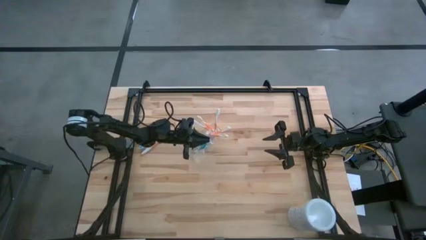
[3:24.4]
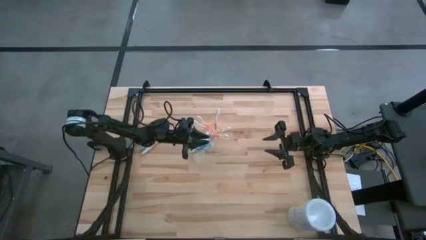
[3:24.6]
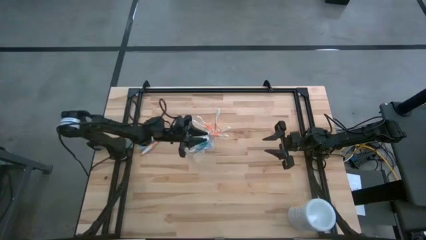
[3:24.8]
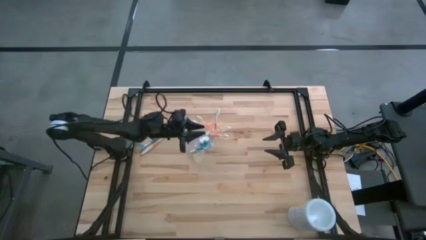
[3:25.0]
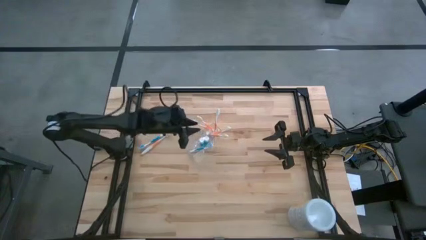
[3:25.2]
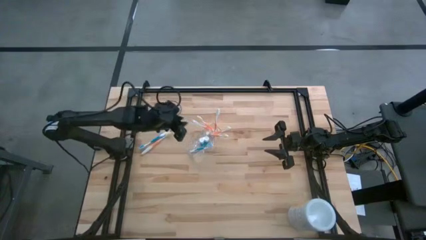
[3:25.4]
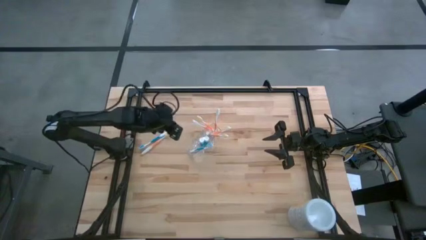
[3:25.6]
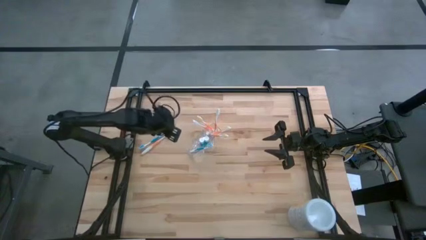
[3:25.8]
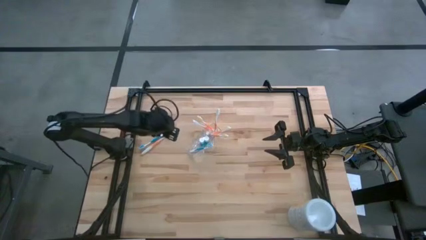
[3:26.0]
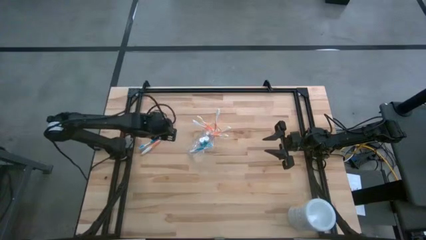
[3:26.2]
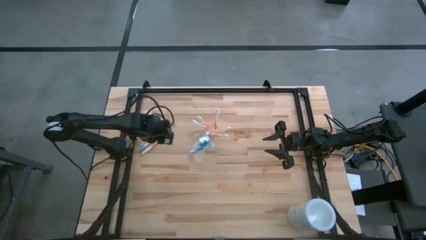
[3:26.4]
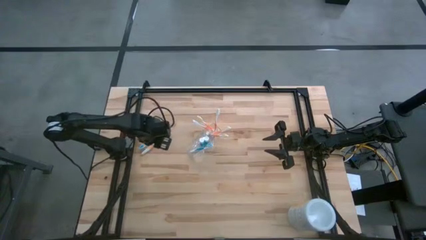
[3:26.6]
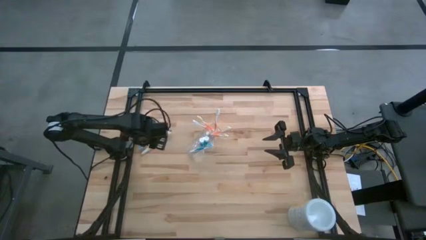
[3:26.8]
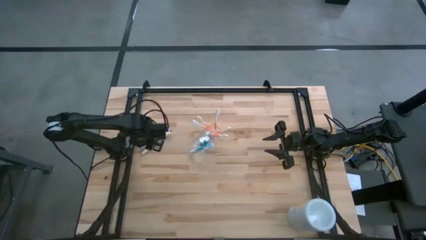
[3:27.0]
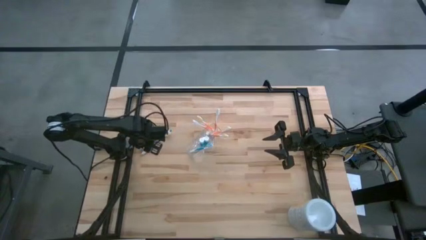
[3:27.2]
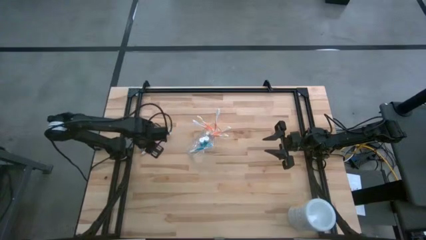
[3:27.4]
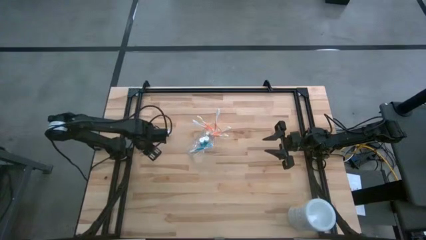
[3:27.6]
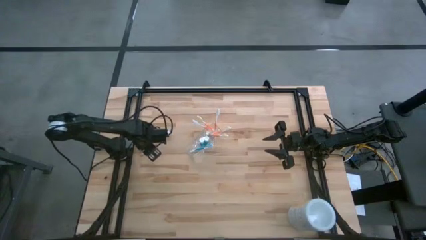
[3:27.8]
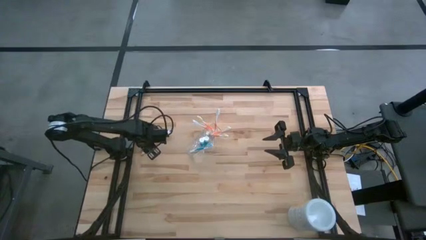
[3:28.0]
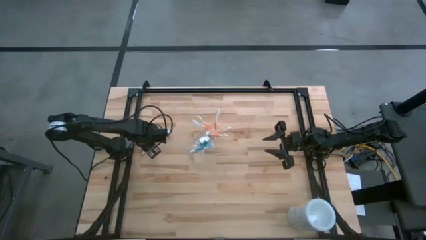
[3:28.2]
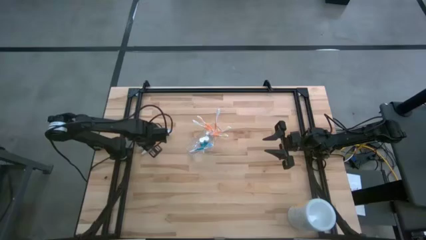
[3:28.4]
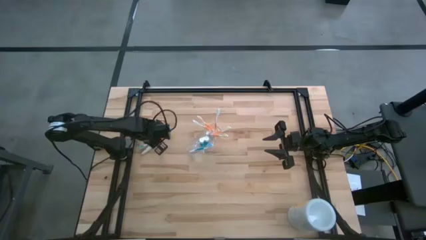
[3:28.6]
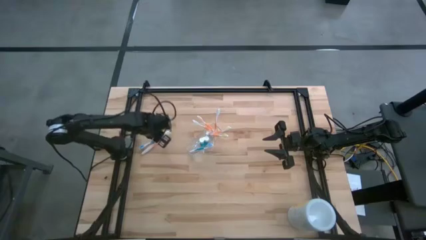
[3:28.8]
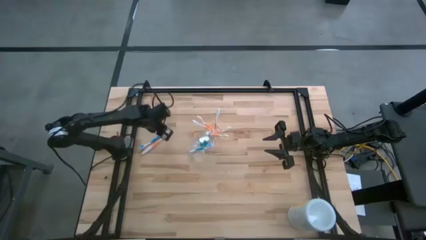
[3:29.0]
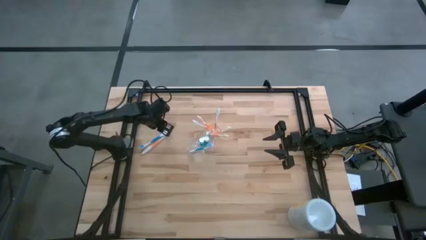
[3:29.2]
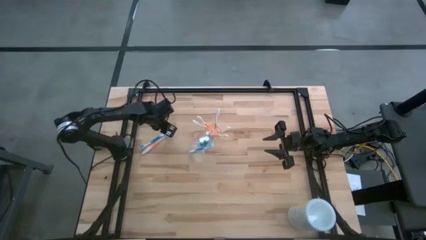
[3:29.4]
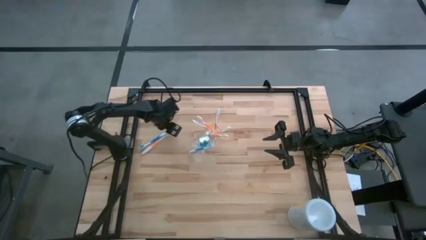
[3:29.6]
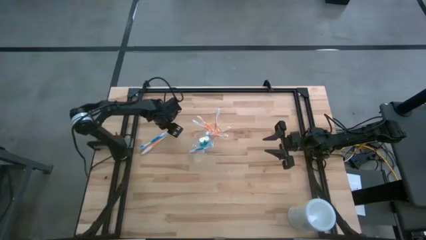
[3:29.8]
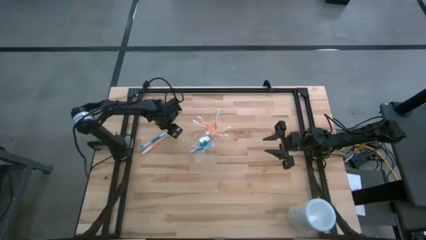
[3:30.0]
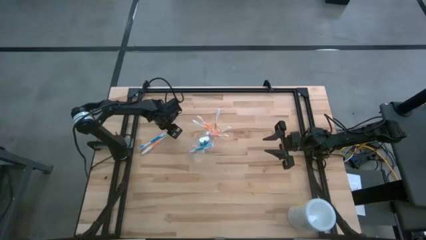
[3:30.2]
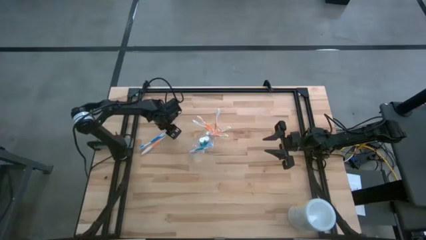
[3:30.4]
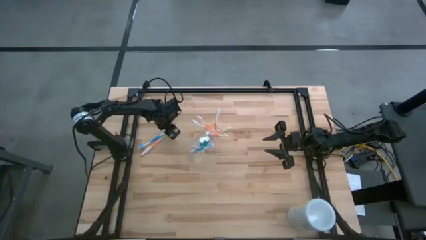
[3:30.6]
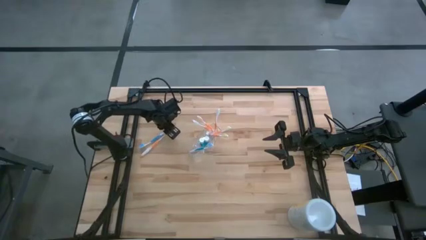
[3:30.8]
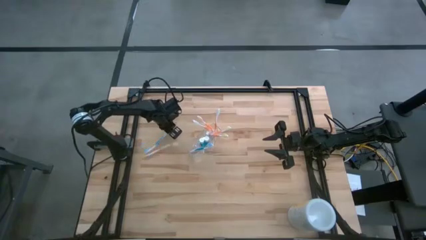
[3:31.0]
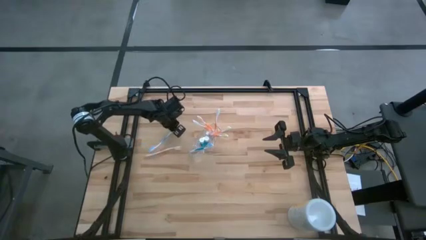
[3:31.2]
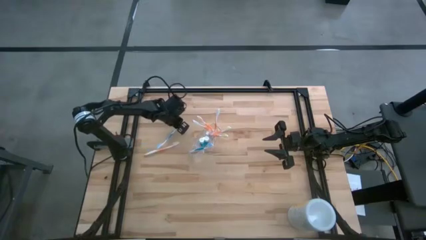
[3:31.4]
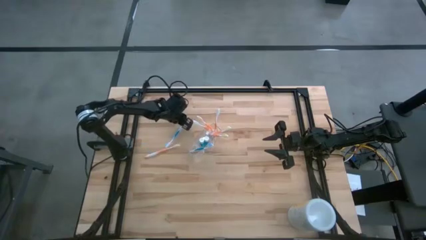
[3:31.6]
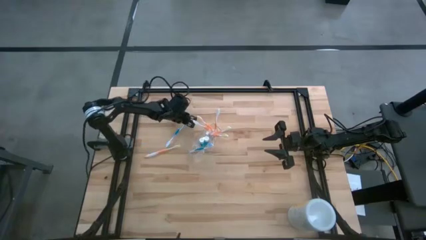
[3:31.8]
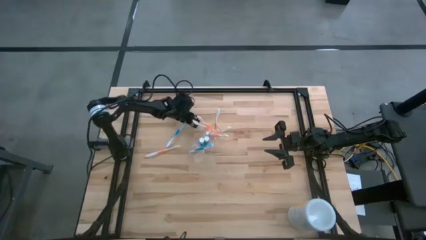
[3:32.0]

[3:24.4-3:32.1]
Task: Pick & Place toothbrushing station
Put the blue toothbrush into the transparent organizer

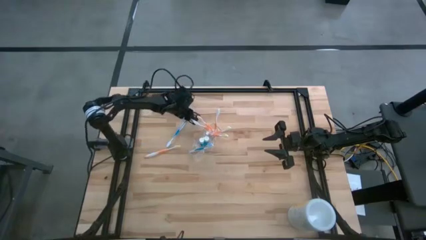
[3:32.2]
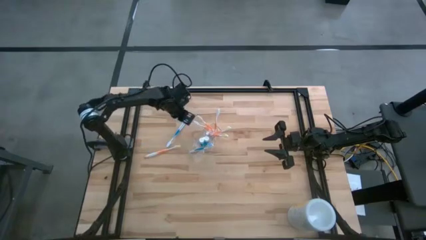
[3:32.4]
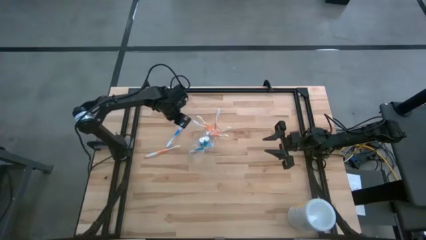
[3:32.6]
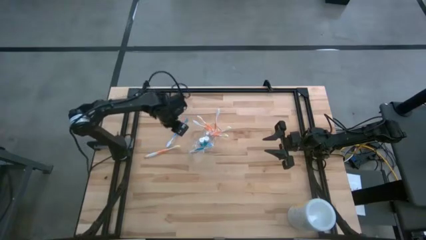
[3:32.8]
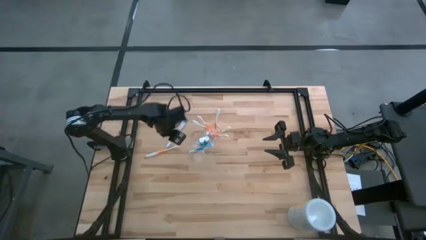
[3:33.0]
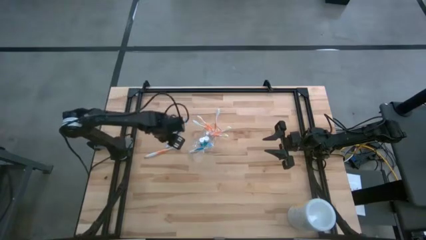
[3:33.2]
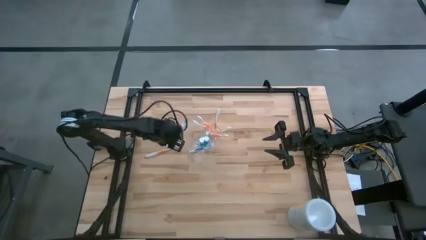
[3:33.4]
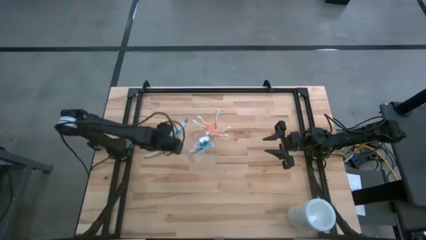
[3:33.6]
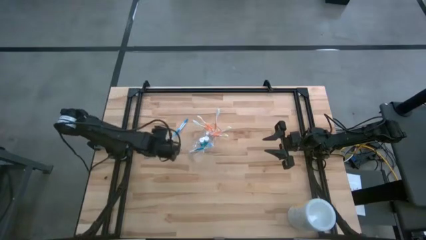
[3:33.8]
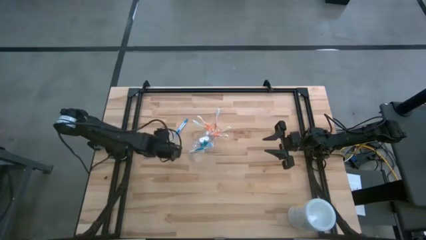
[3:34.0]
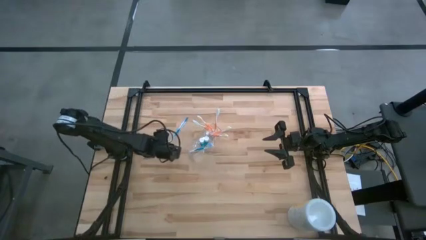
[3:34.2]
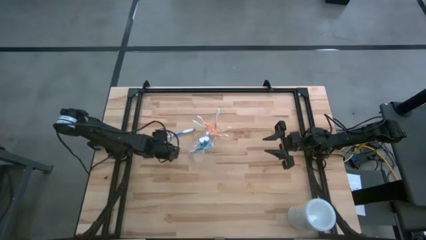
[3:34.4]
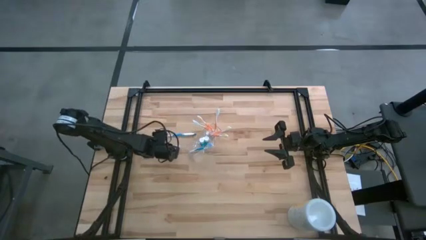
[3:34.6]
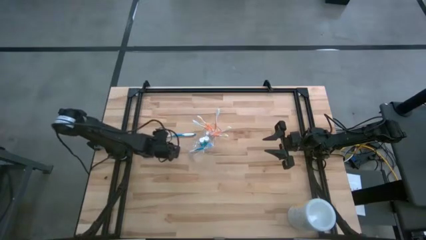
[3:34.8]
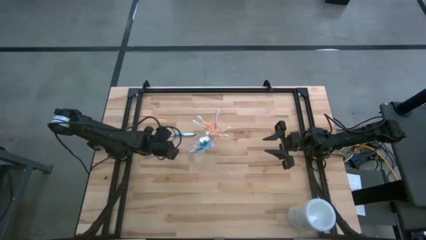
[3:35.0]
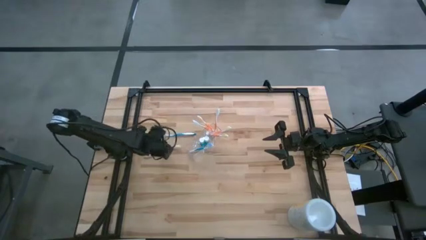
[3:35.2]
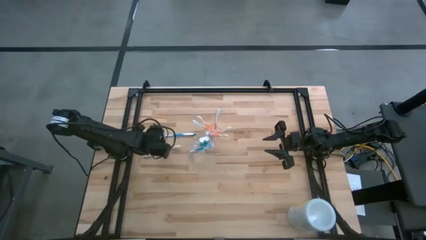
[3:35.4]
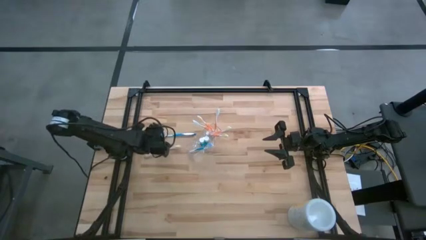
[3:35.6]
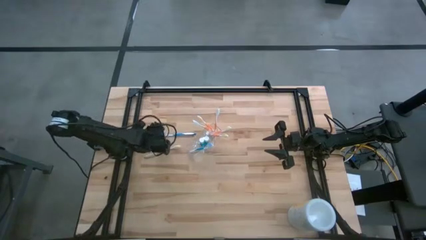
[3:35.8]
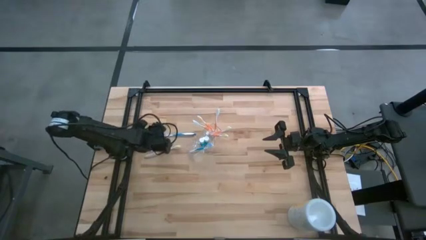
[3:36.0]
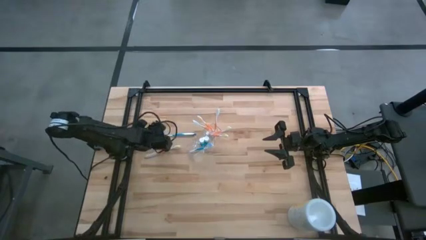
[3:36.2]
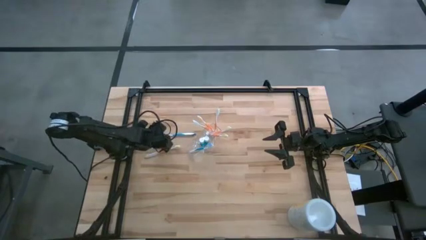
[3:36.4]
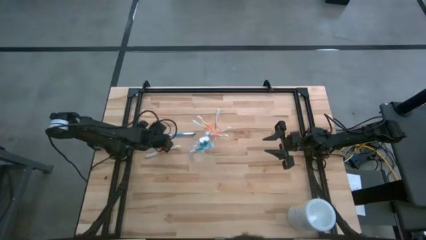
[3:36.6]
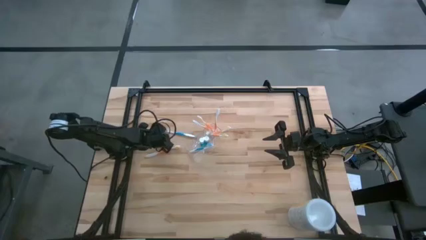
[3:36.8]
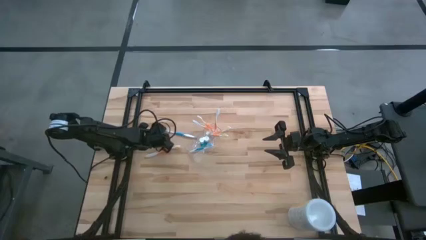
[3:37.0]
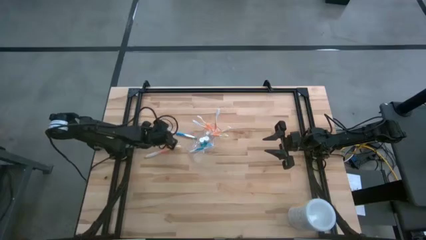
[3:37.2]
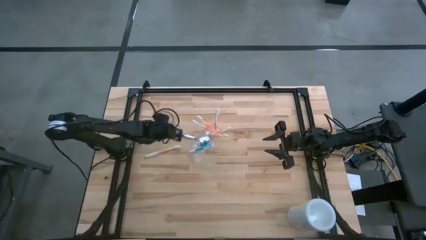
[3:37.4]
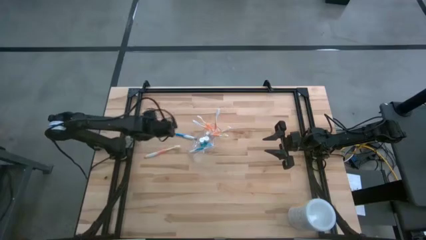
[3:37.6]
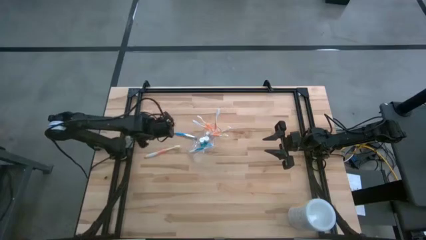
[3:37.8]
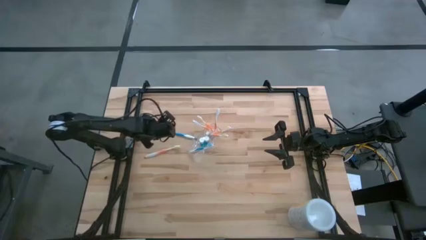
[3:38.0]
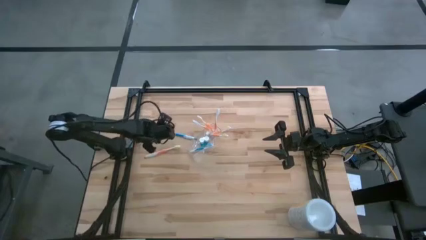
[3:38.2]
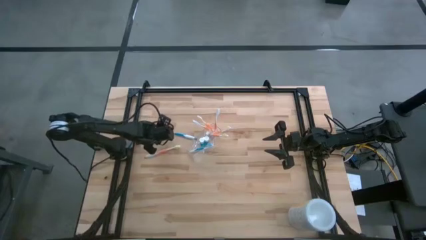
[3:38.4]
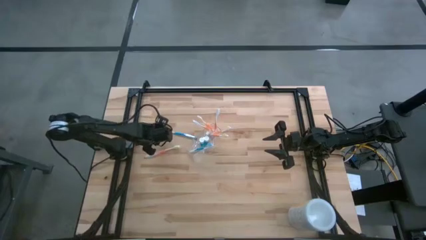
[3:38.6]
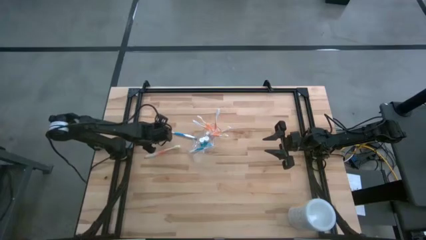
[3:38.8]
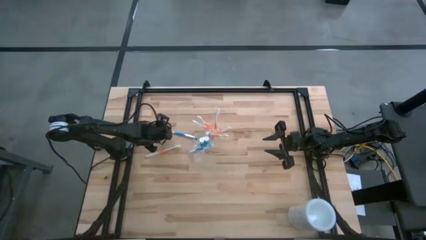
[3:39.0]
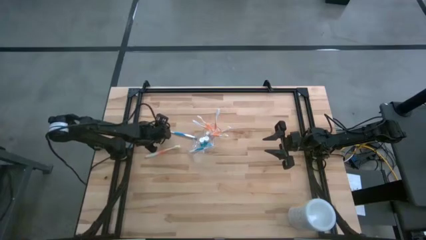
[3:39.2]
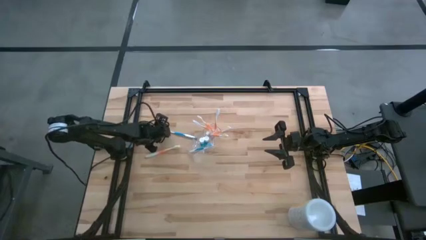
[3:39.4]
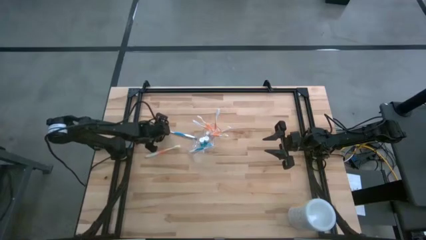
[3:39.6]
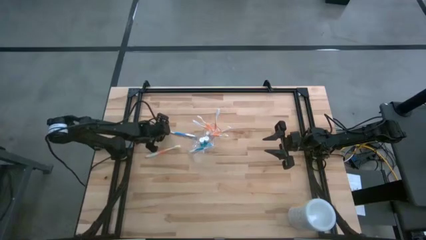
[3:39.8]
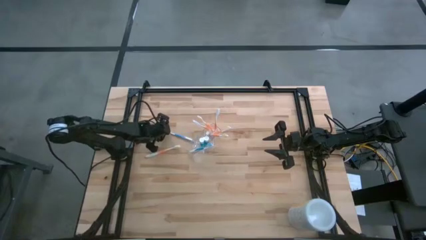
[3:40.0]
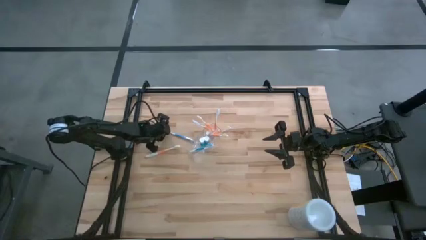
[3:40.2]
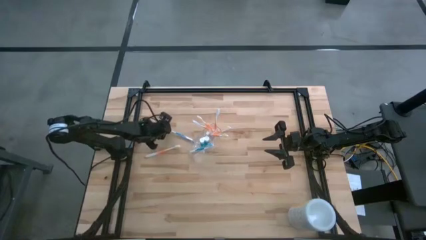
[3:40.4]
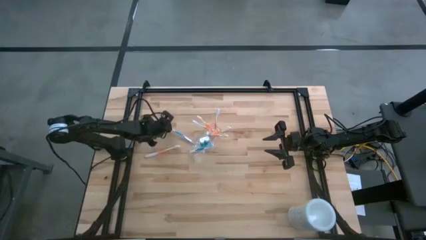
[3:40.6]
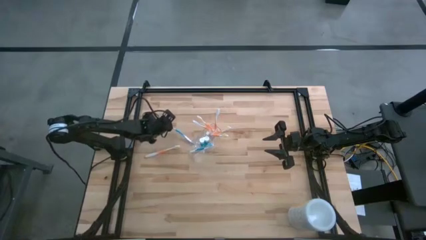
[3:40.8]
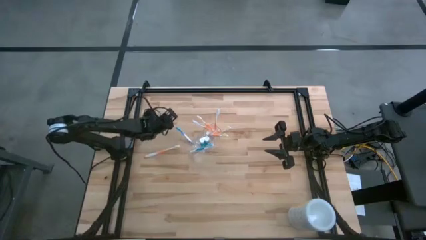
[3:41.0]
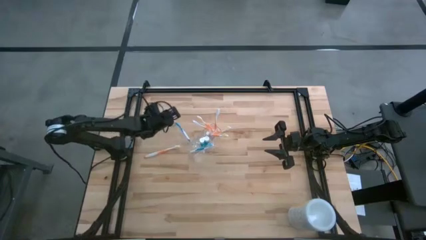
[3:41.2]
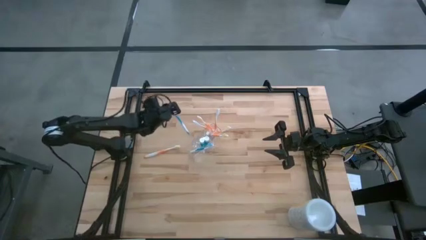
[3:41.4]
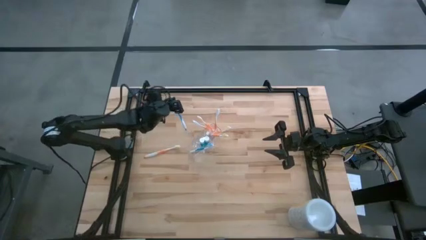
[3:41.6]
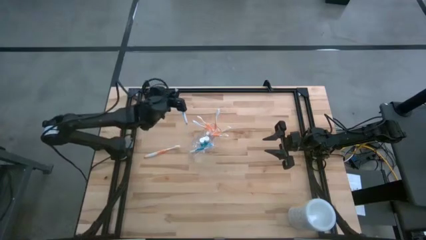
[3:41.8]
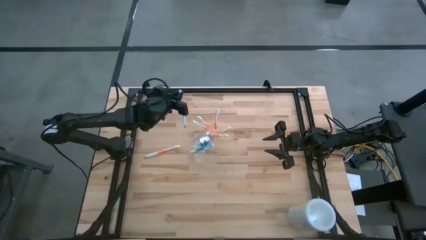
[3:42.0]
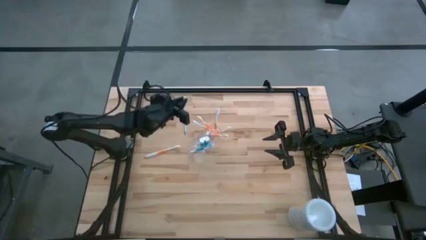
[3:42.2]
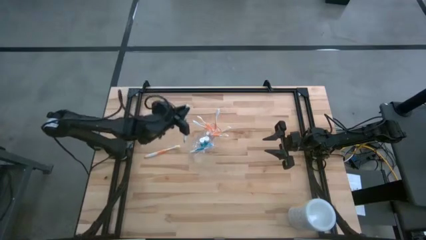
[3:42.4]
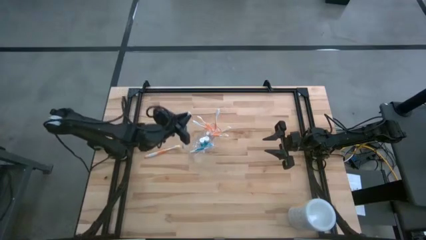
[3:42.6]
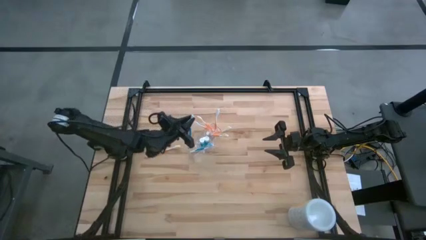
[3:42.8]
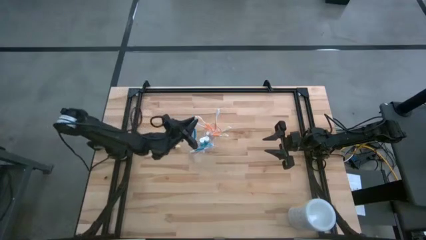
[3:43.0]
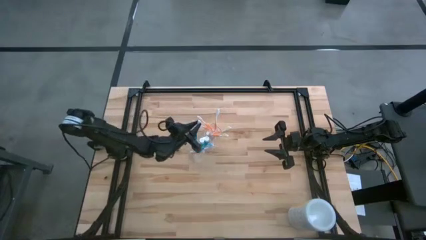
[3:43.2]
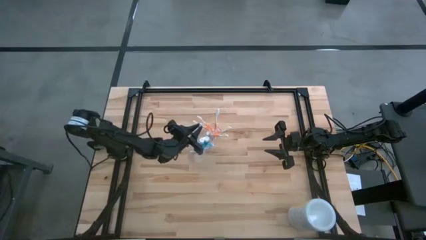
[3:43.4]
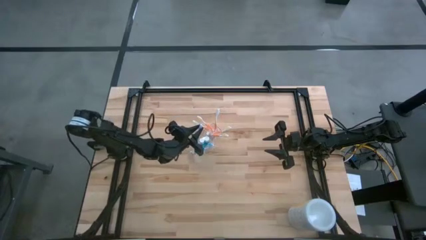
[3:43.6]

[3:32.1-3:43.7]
Put the blue toothbrush into the transparent organizer
